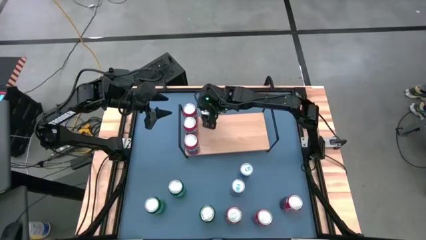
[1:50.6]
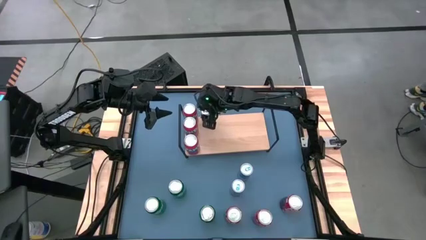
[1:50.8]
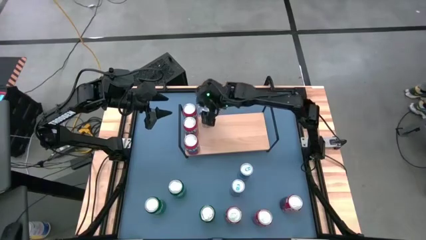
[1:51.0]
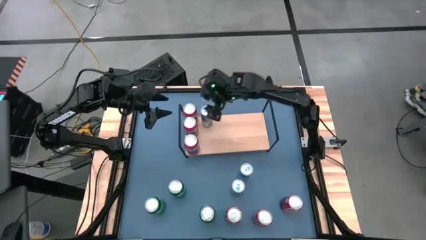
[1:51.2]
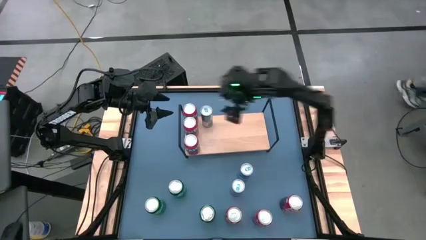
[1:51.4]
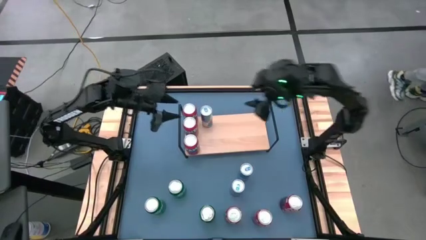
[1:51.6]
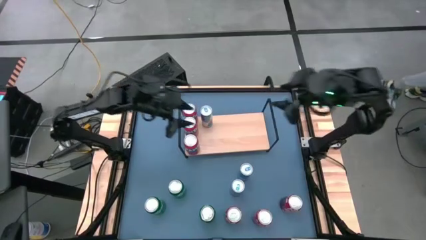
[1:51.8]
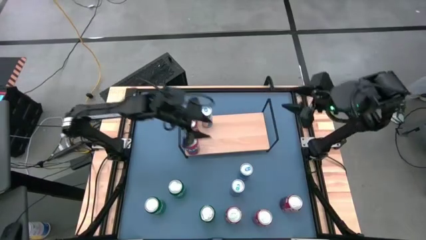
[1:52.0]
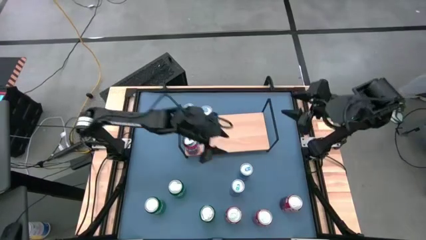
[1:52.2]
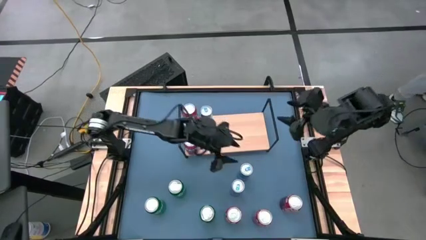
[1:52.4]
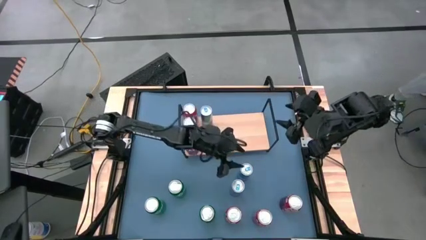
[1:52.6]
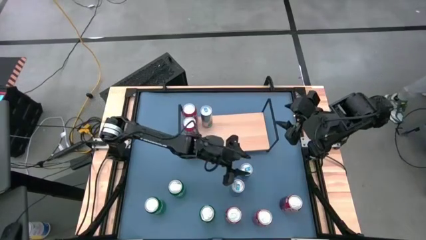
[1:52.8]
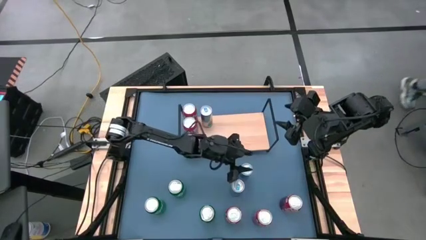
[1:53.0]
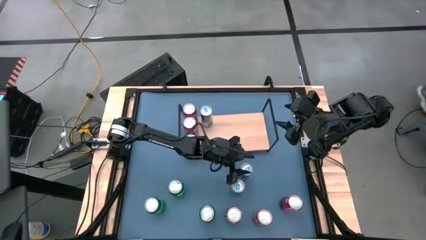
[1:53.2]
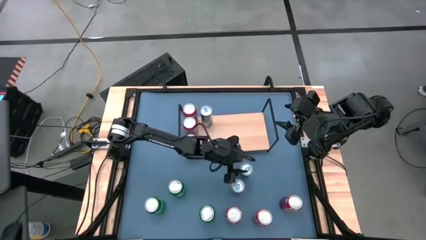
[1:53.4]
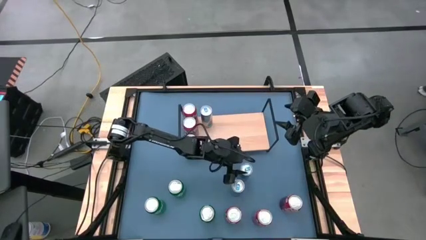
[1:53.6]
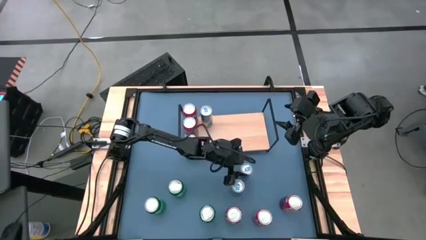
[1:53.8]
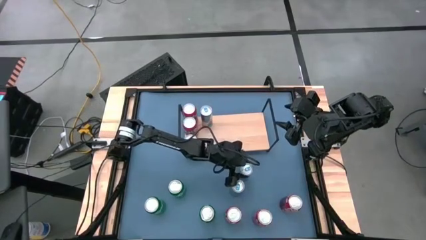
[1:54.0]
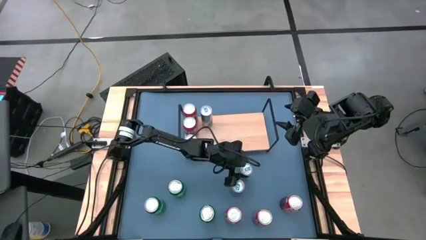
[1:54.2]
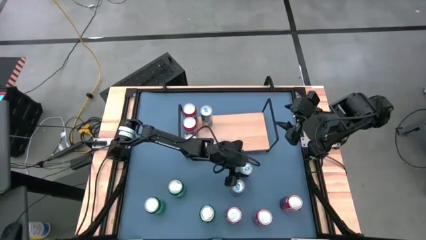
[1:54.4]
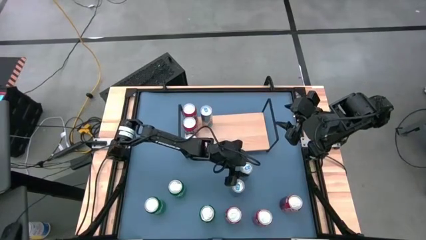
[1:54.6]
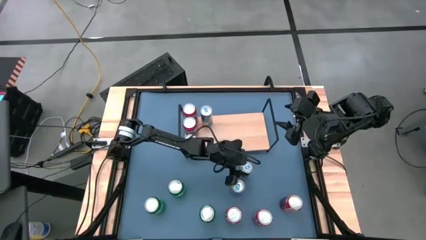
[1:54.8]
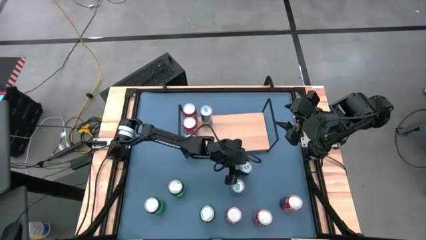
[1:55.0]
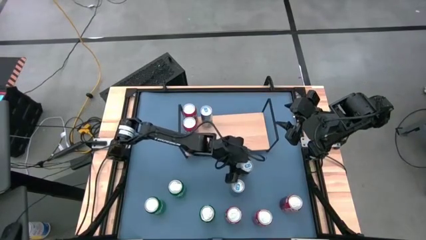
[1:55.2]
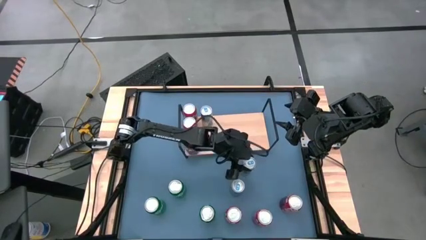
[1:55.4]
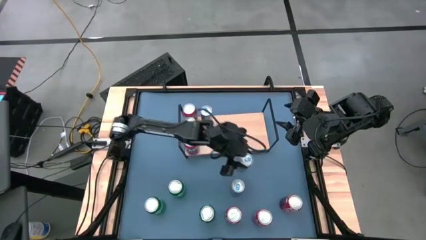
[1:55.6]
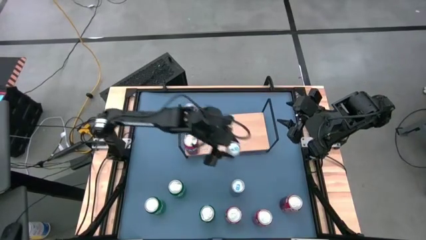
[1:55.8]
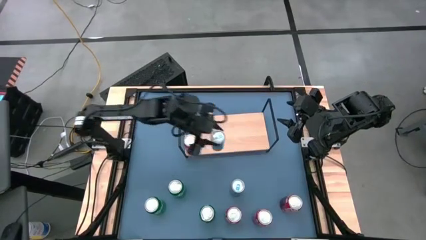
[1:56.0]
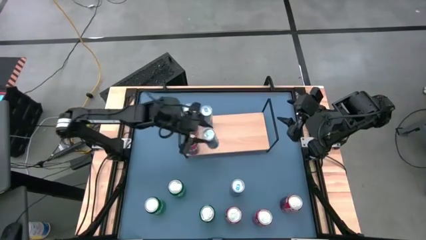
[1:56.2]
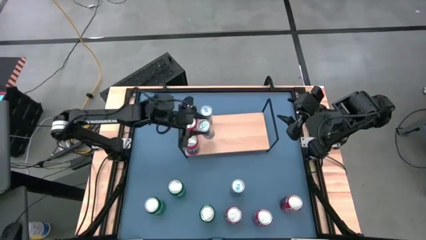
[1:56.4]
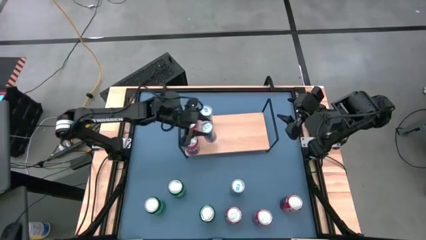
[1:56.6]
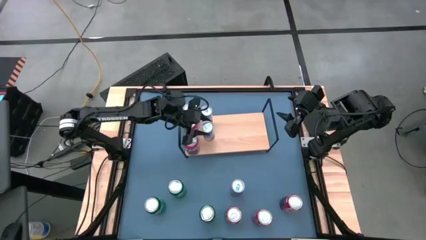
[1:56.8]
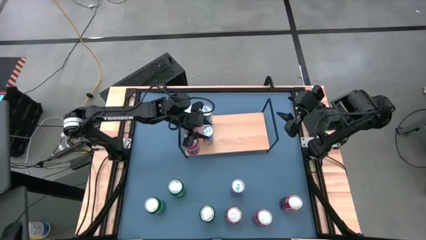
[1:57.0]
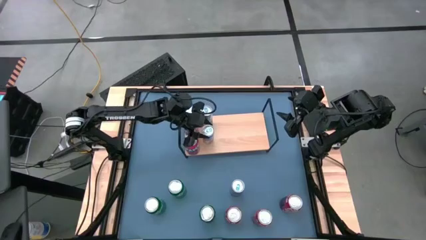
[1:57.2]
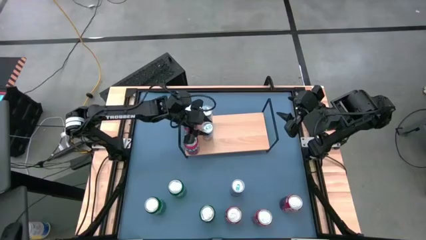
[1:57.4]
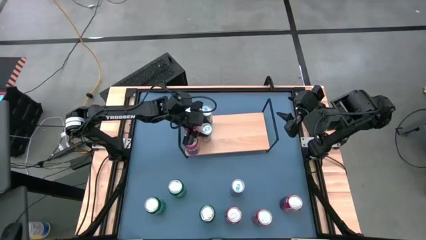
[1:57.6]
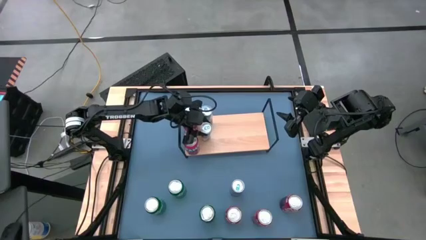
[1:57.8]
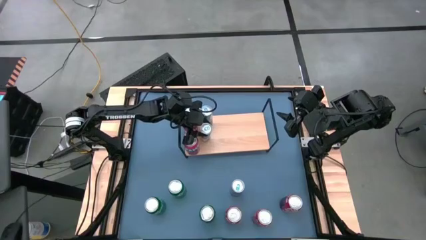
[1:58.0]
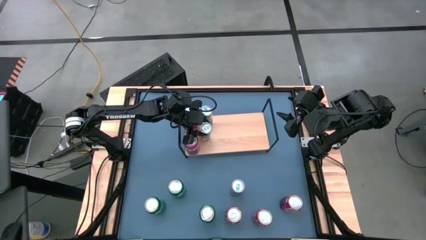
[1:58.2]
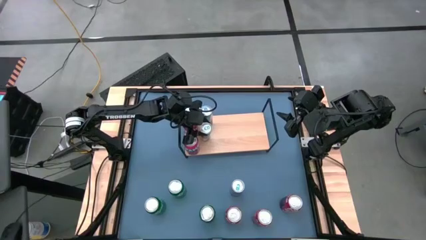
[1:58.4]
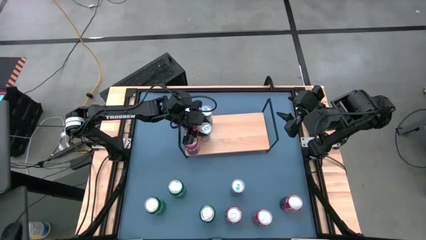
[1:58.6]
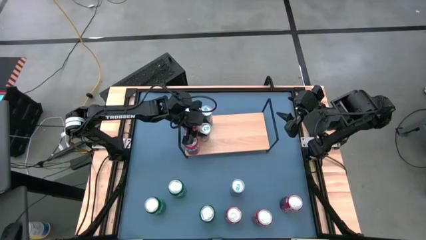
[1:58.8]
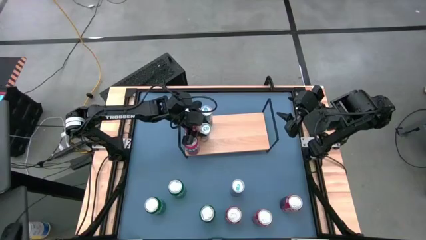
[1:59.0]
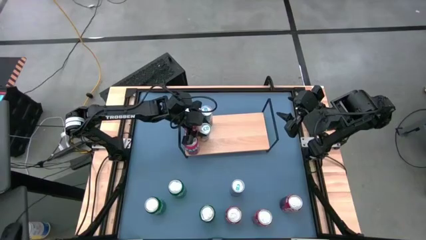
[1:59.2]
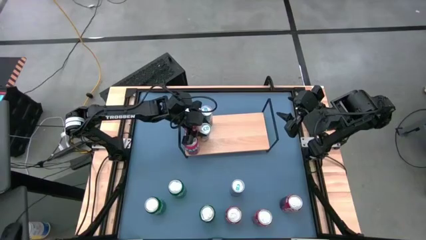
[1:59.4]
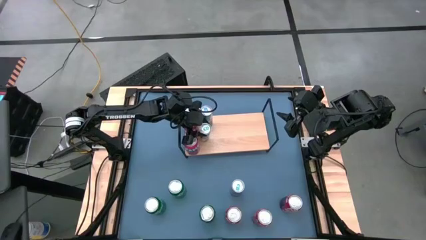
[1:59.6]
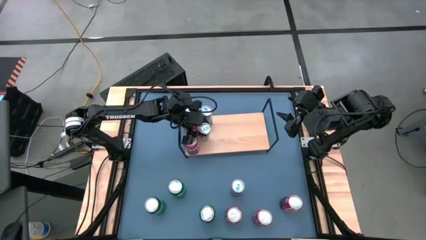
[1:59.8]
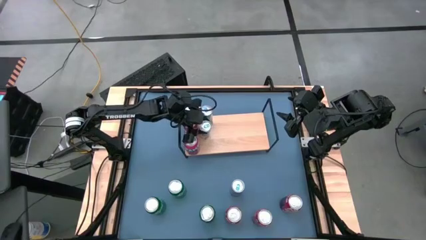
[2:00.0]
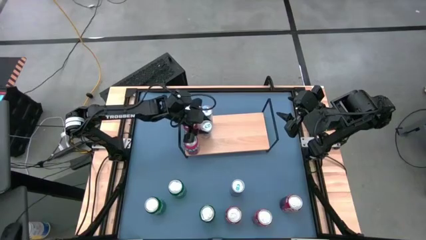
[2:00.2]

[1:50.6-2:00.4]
Task: Place canned beverage on shelf
Put the blue soda can on the shelf aligned with other blue soda can

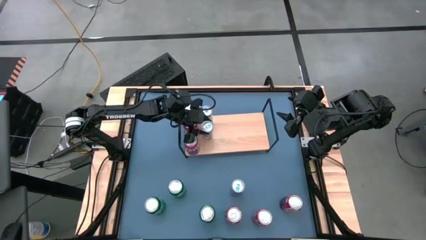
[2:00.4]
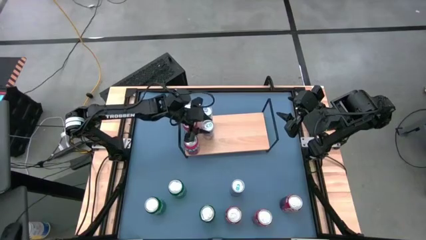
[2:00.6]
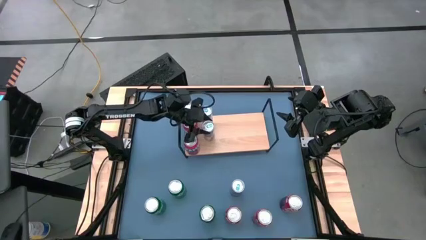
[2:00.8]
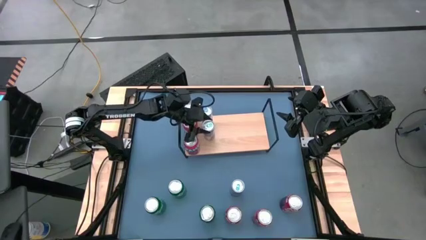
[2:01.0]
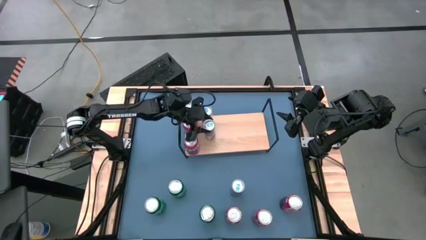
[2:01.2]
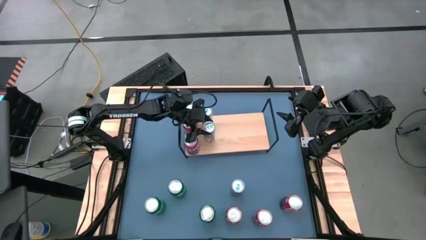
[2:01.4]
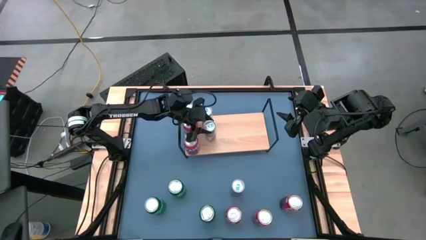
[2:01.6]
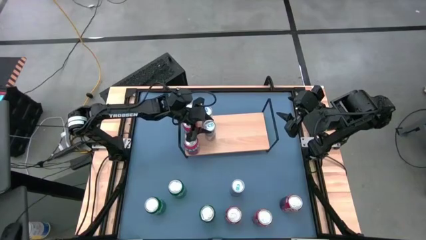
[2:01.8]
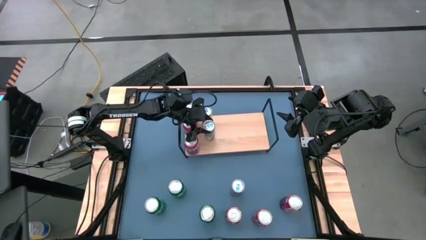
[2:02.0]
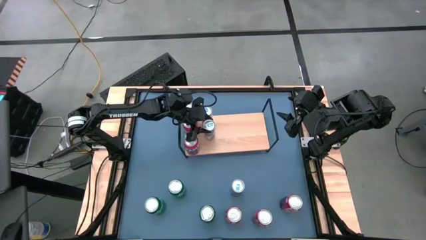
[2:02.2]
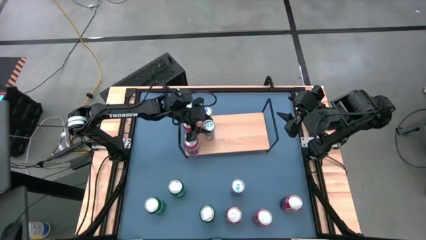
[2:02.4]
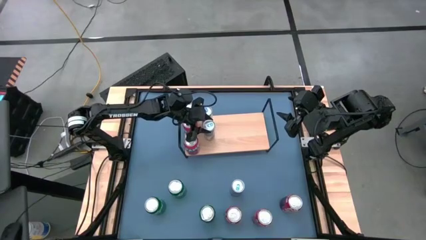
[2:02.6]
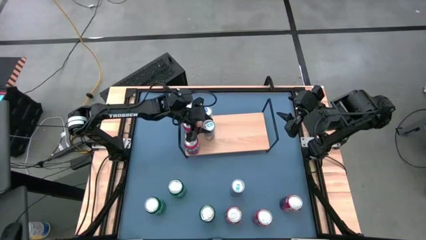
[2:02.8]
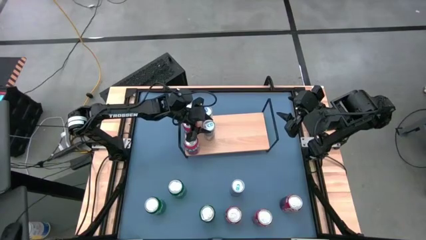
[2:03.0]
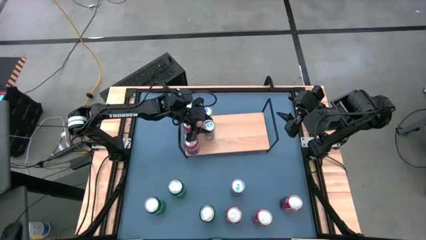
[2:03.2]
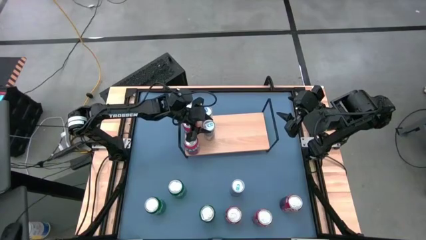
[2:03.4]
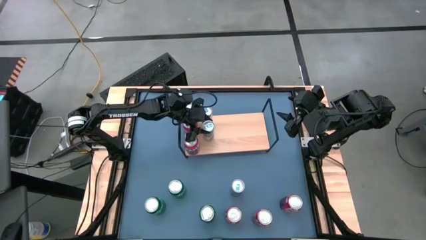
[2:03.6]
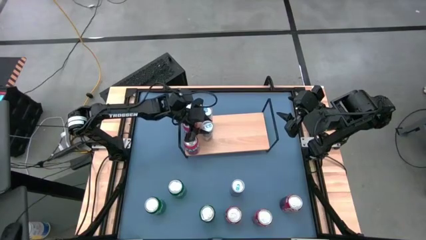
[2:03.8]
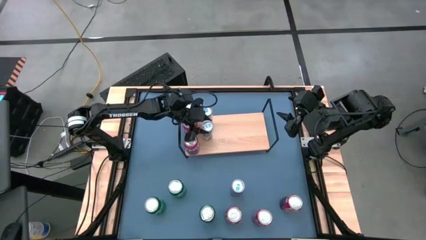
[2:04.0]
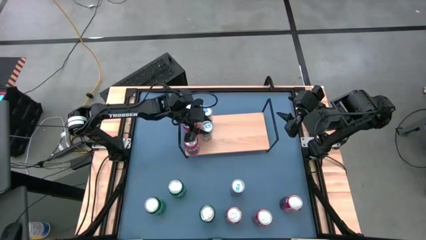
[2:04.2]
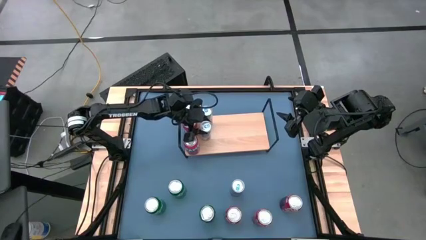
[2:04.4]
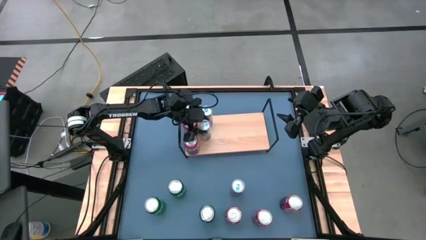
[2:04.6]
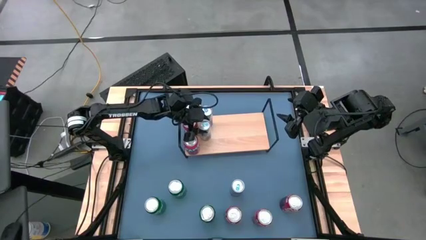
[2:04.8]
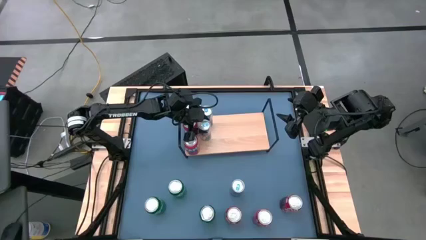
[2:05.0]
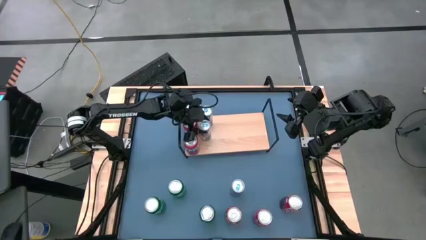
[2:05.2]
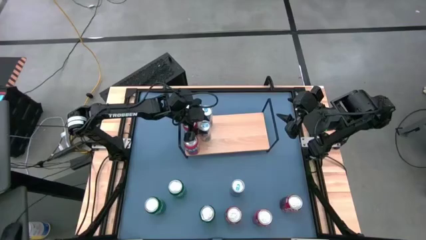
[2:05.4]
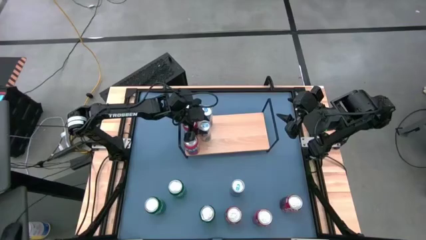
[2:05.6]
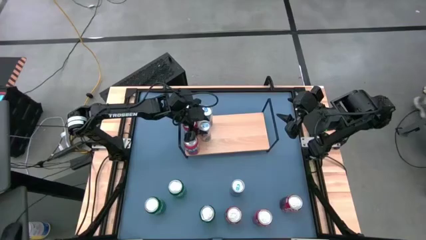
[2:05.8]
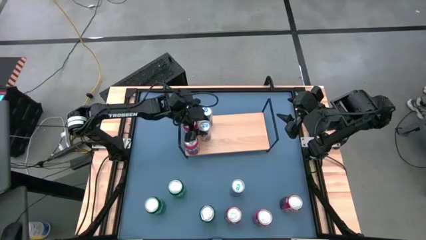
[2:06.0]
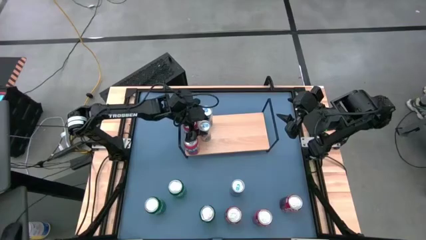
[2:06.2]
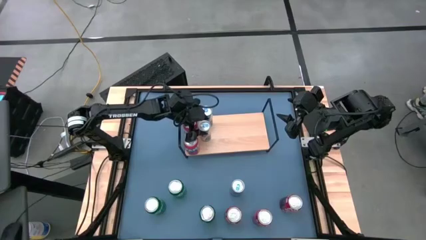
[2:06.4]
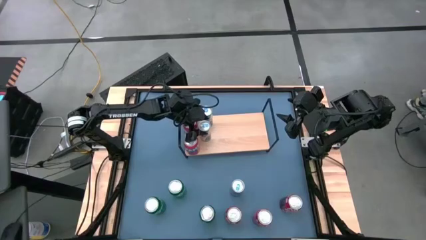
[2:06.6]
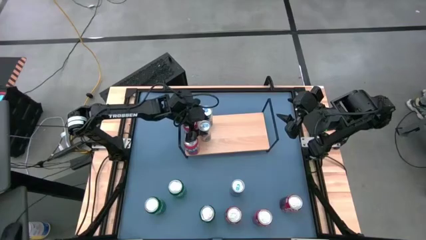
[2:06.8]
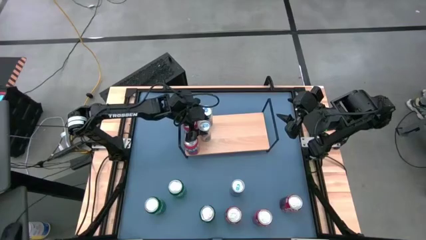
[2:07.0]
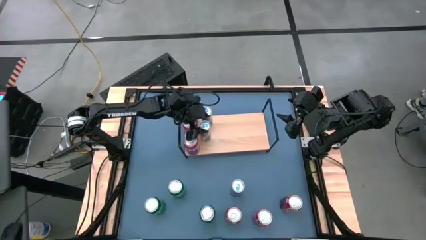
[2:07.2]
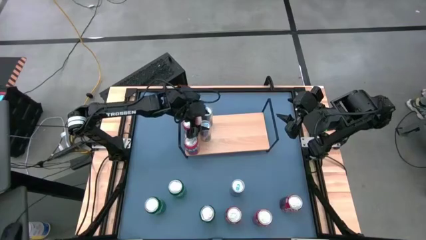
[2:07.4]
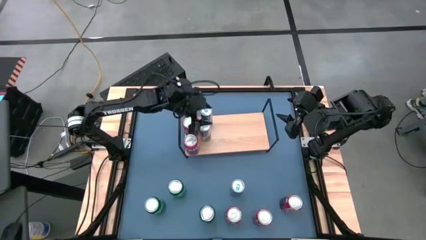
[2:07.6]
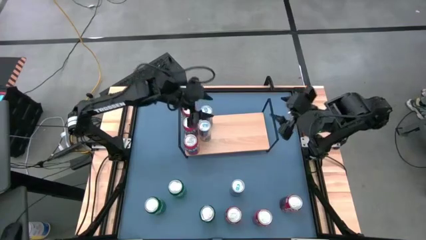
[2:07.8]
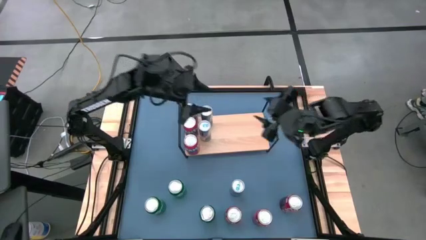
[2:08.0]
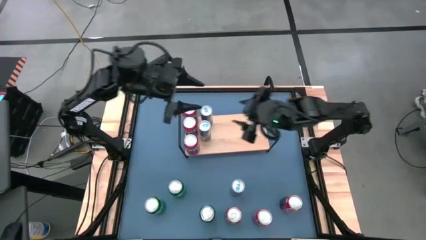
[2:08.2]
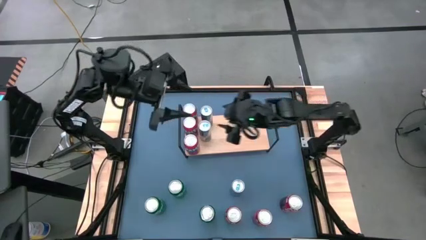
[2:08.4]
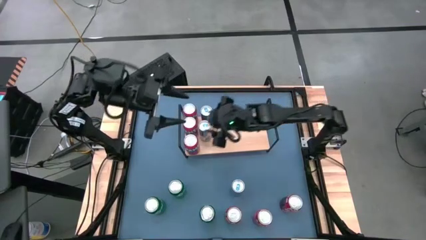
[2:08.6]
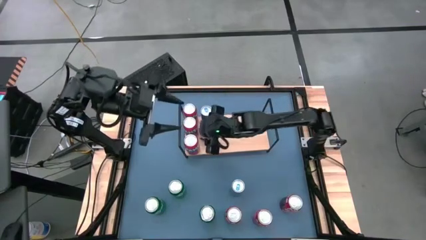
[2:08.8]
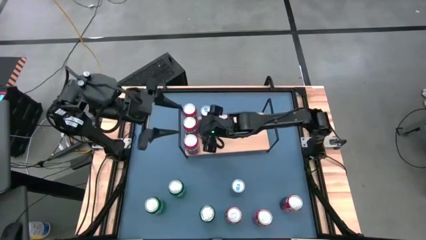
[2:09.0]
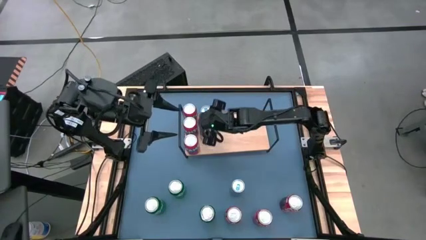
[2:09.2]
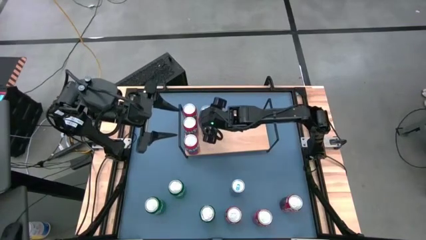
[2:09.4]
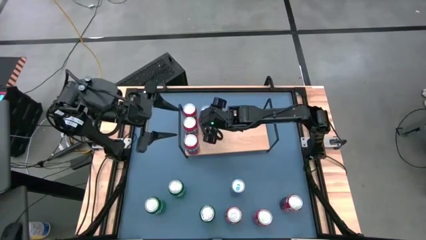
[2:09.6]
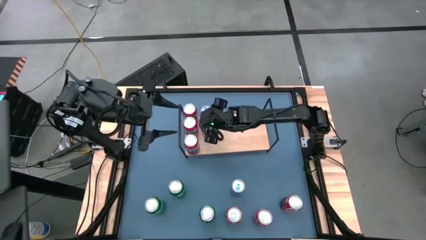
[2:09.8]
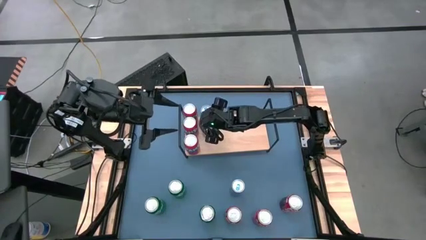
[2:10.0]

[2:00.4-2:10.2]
Put the blue soda can on the shelf aligned with other blue soda can
